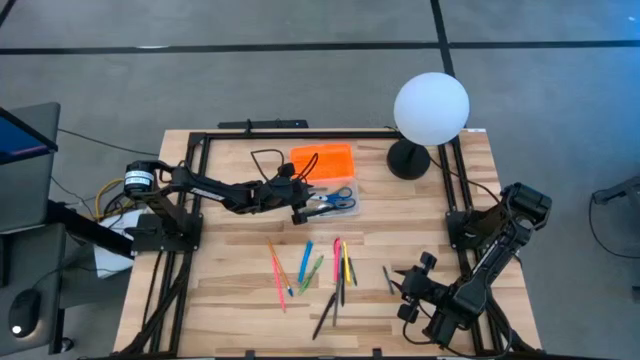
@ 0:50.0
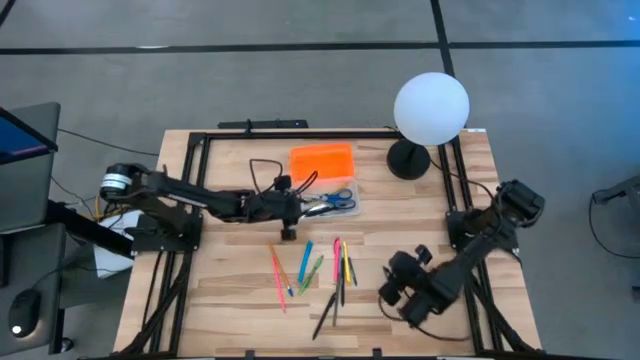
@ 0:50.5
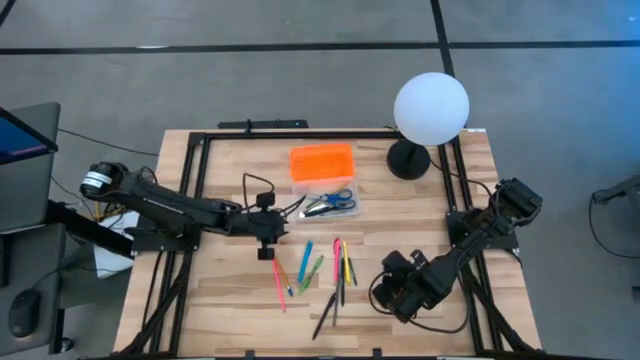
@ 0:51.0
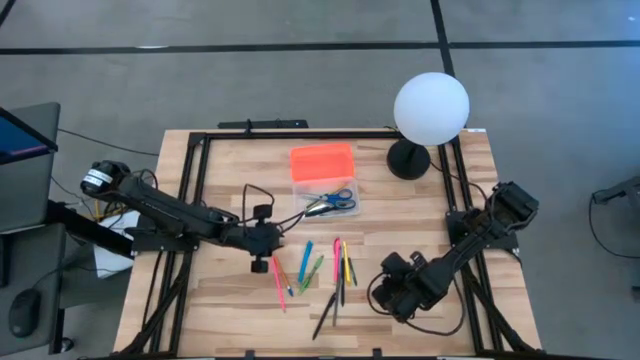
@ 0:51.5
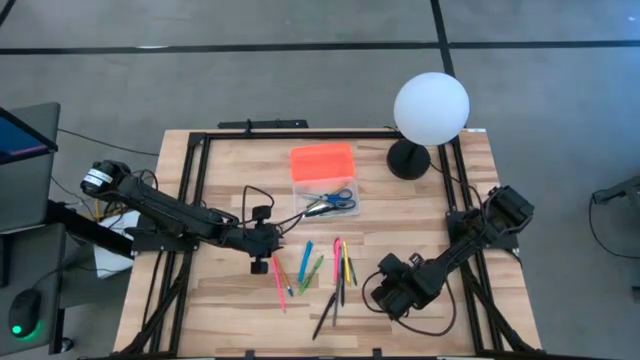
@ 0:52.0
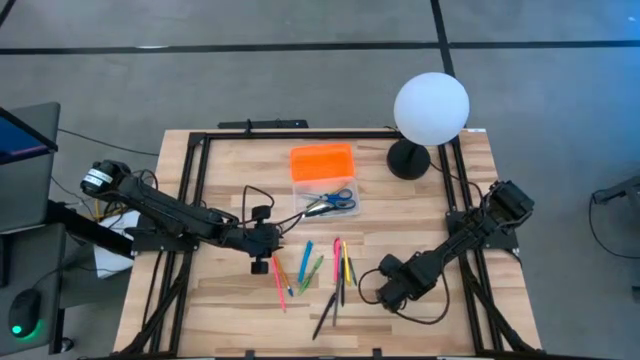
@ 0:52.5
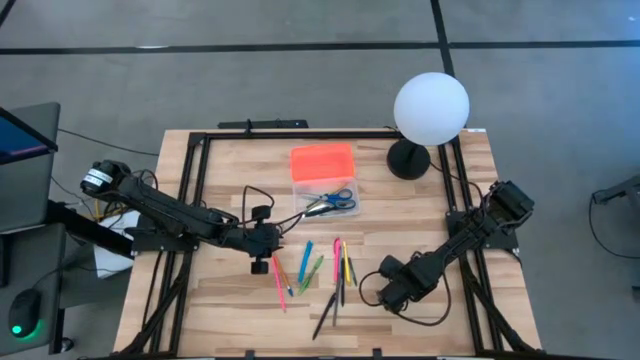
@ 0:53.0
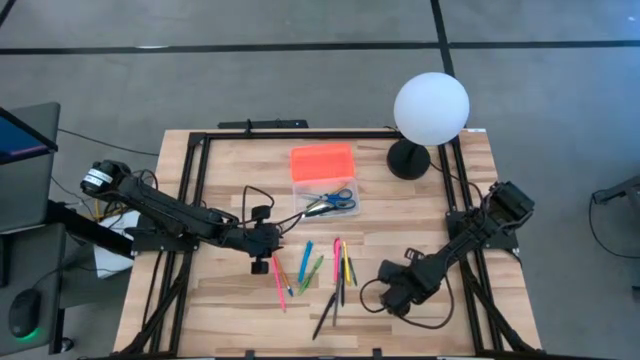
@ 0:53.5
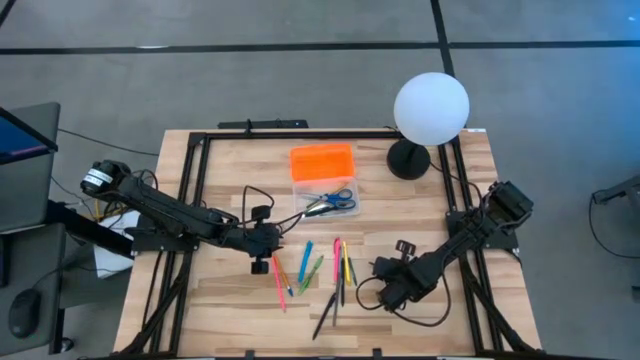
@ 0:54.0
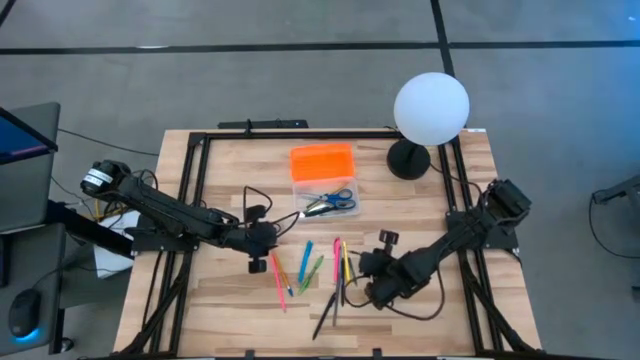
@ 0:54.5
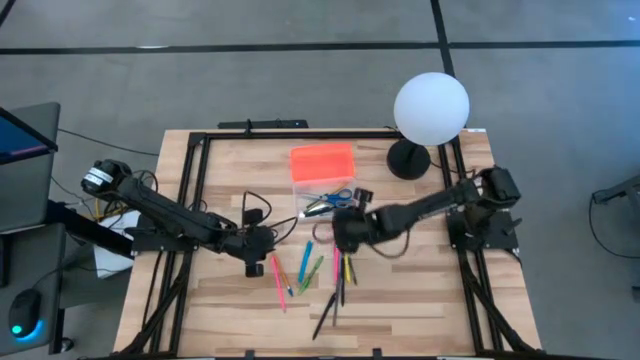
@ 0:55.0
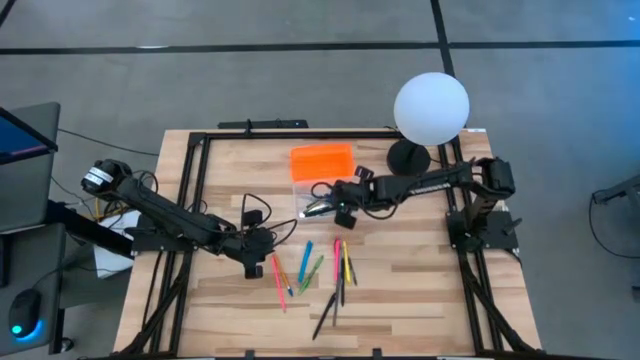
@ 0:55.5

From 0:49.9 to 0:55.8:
Task: Pick & place school supplies into a supply box
Put the green crayon into the supply box

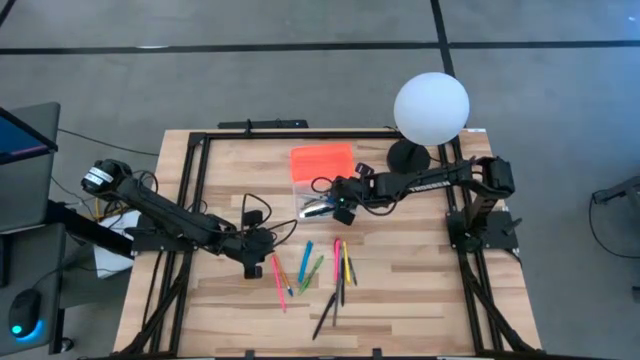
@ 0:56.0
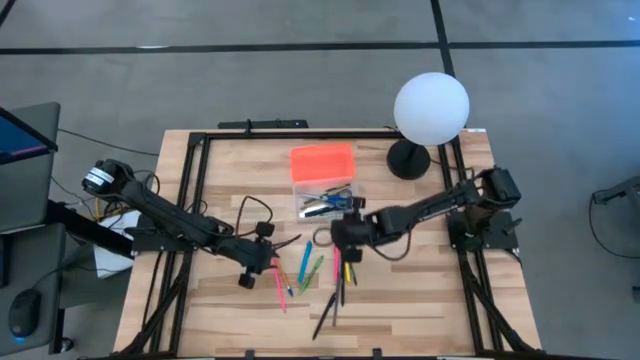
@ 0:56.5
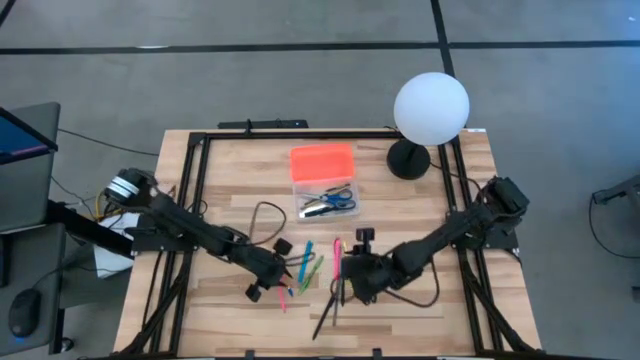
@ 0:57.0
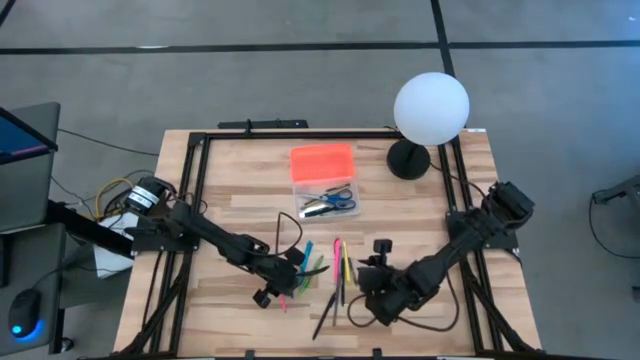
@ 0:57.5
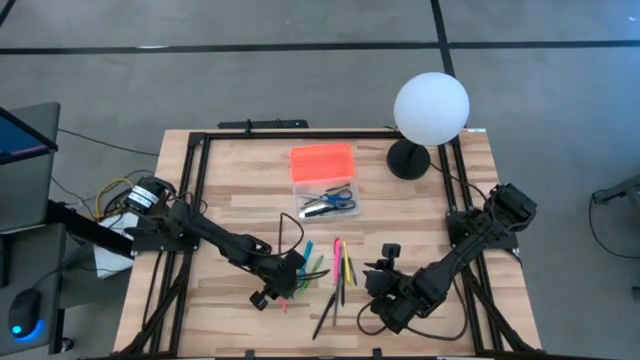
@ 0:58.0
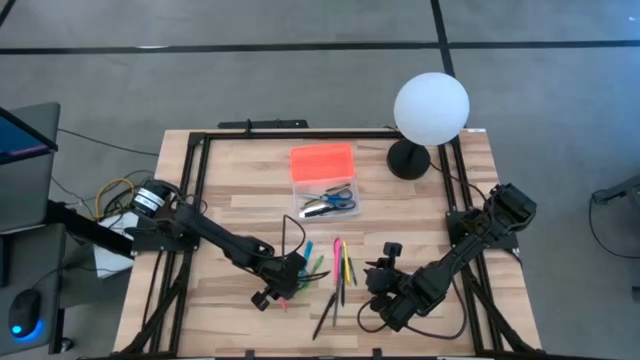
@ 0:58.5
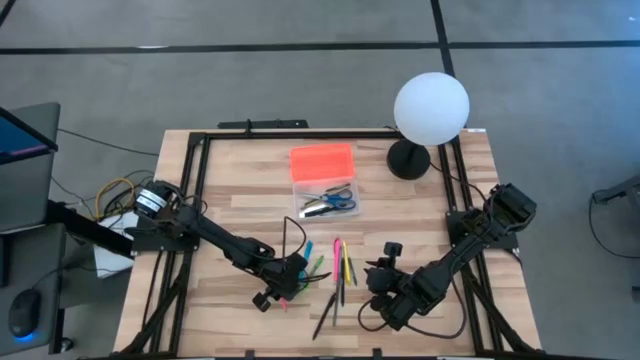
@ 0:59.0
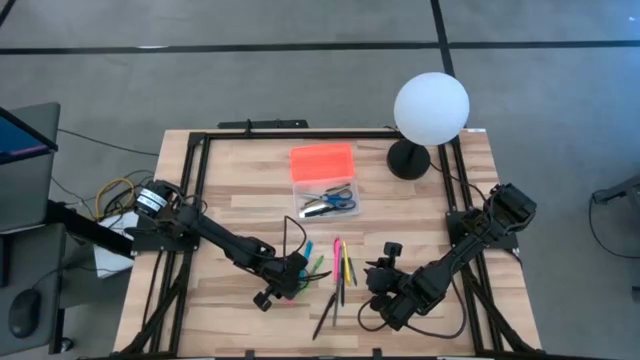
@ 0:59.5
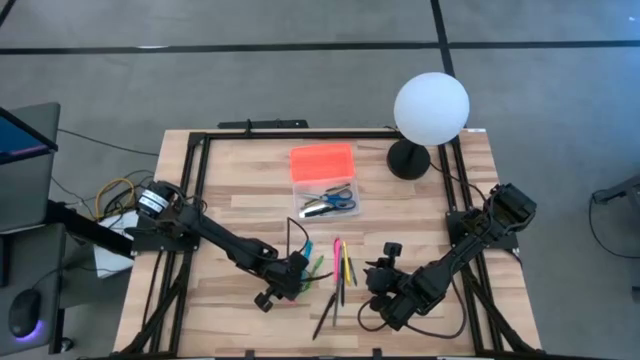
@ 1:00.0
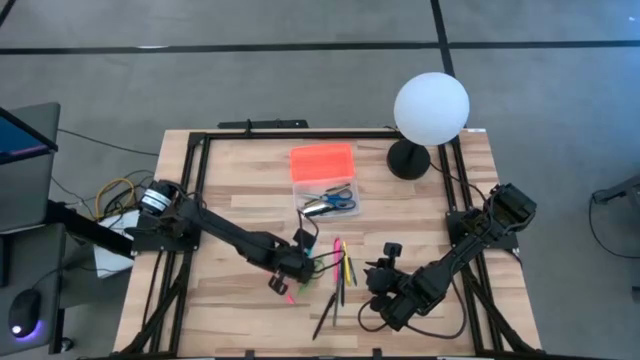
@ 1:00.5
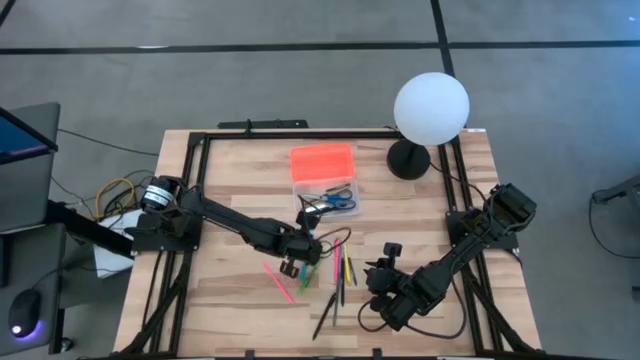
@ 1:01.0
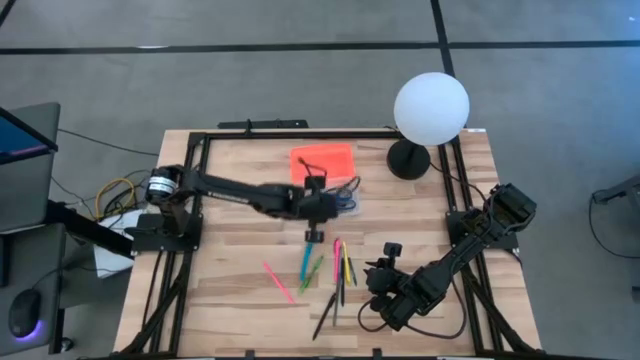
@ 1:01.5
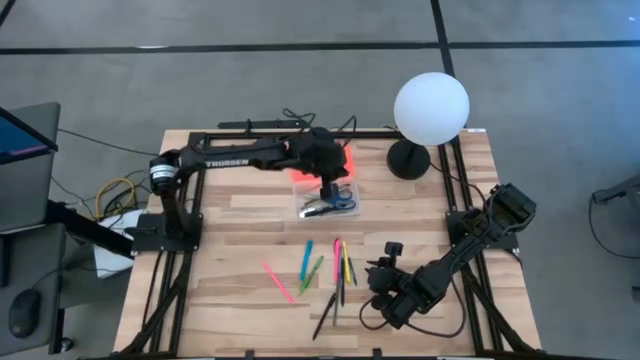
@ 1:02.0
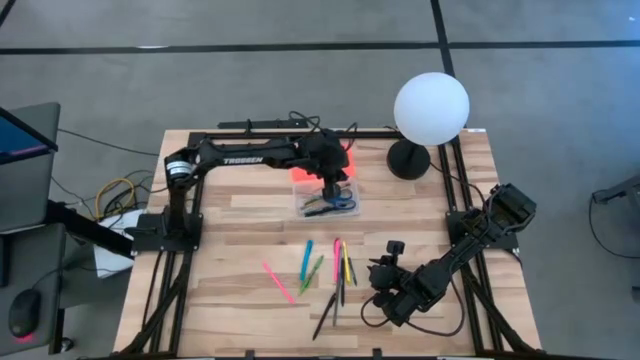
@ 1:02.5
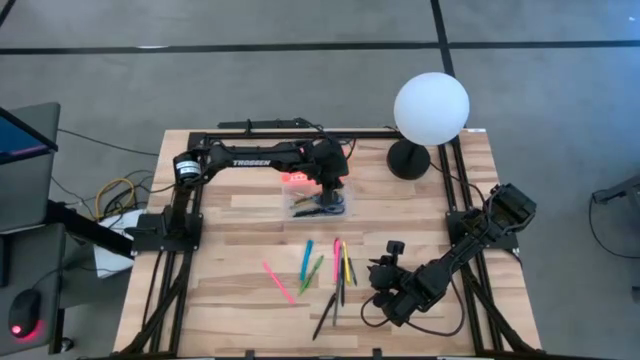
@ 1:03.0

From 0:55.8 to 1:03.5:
Put the orange pencil into the supply box

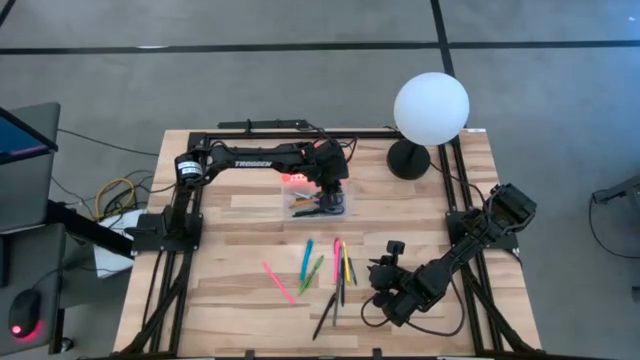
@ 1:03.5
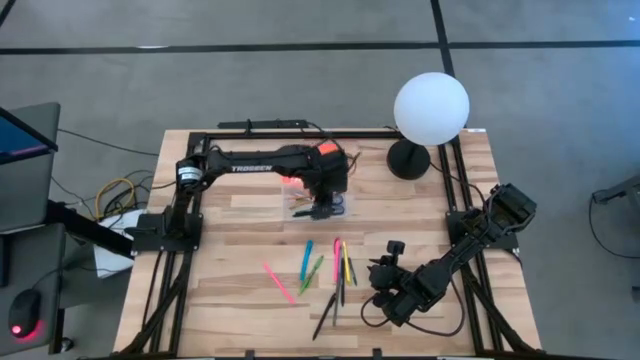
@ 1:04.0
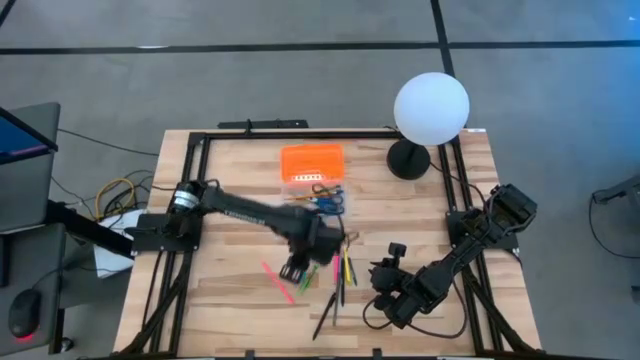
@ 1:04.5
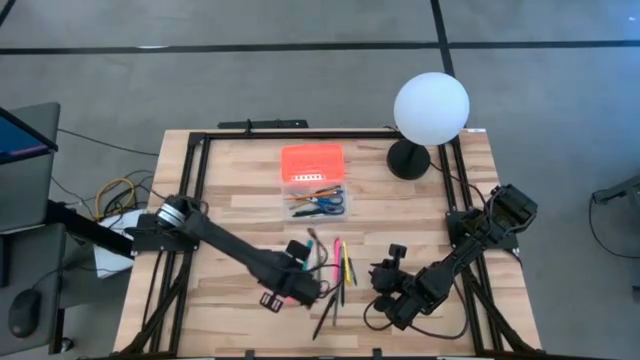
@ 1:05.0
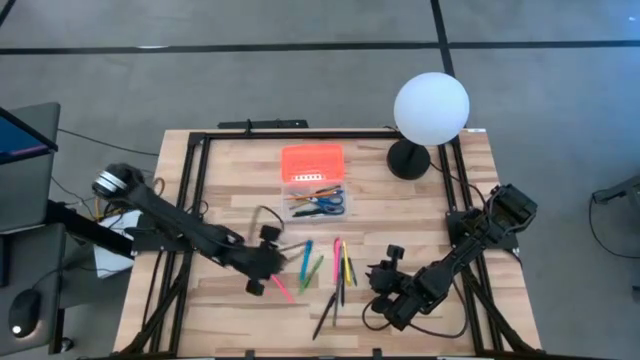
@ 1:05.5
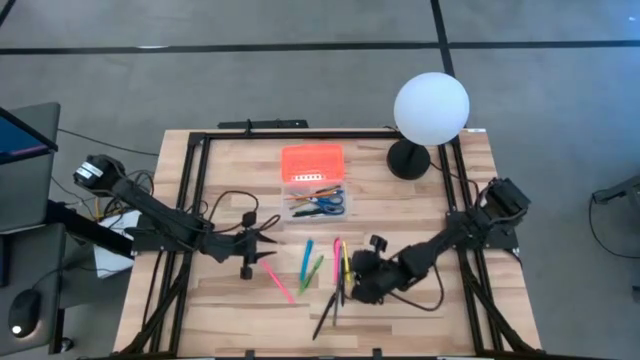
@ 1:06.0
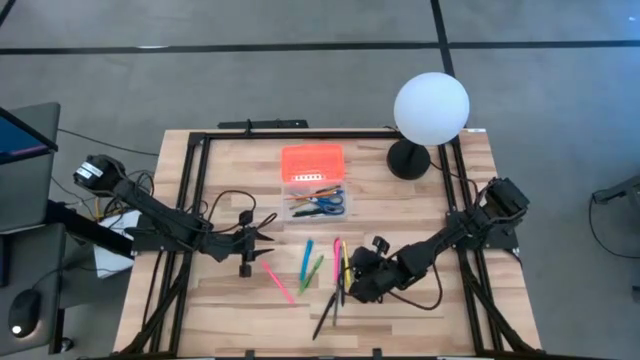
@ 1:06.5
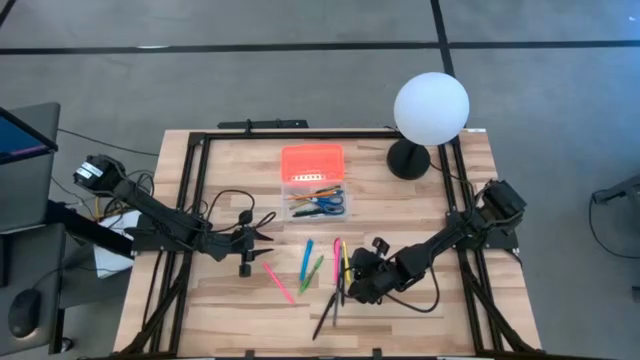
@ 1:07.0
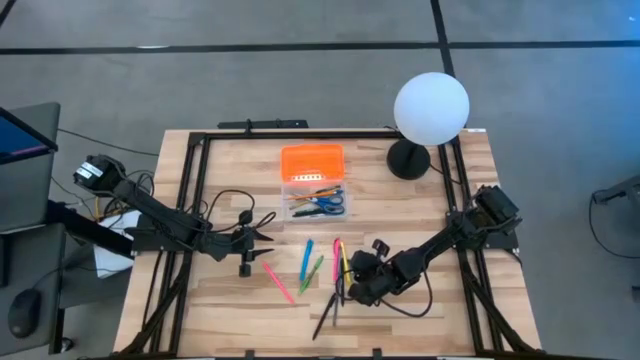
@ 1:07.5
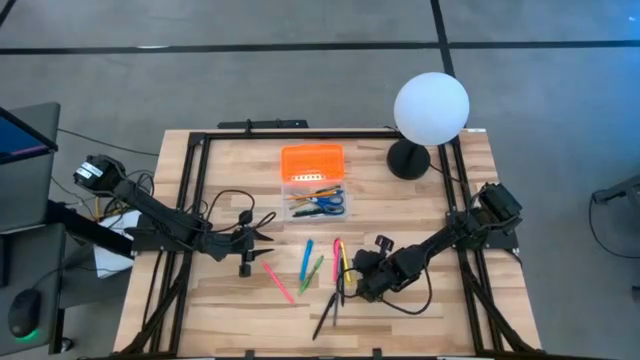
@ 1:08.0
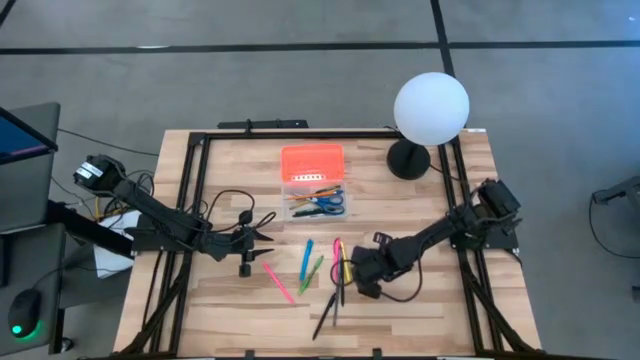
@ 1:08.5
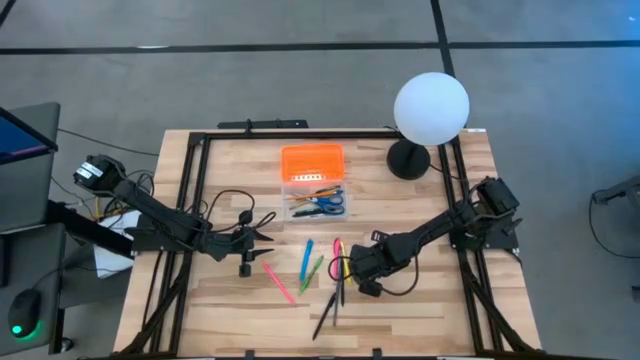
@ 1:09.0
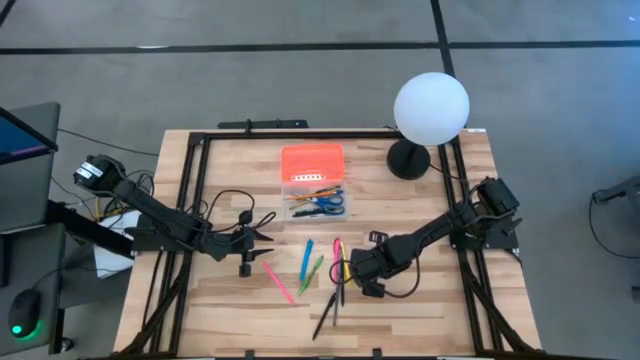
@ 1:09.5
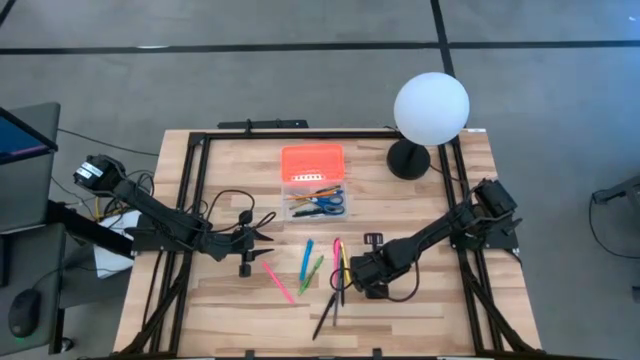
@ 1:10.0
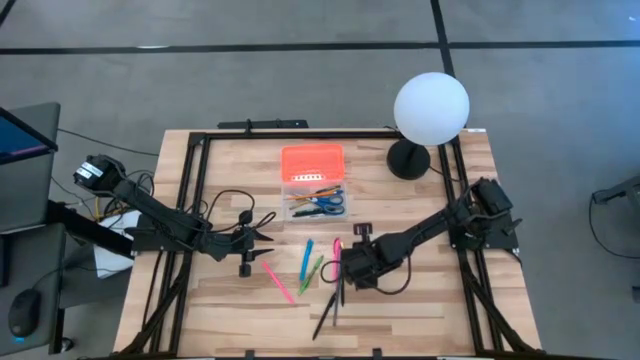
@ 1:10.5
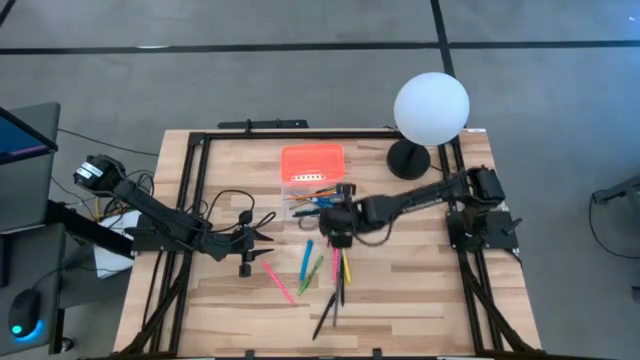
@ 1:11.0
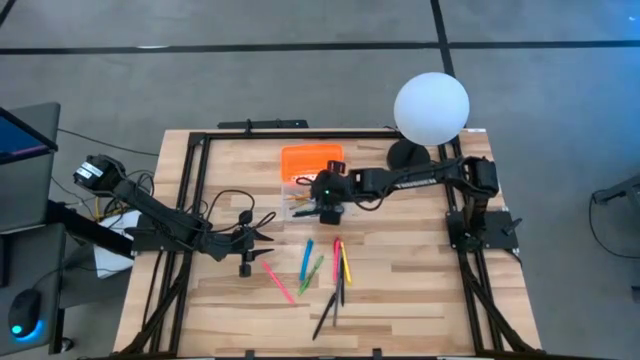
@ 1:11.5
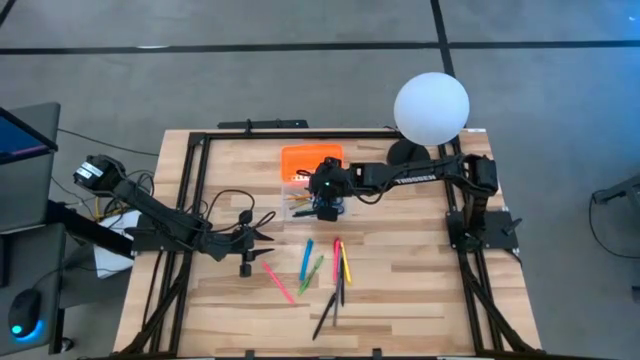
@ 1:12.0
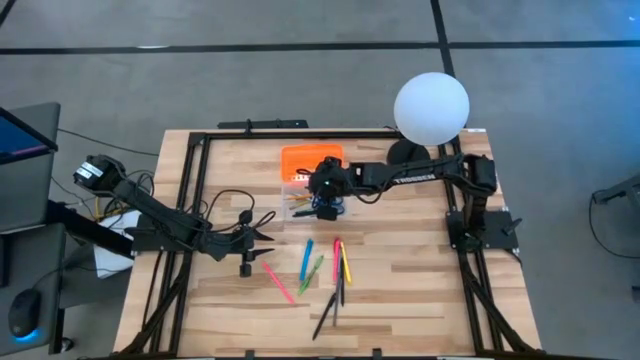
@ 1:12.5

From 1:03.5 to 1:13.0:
Put the green crayon into the supply box
